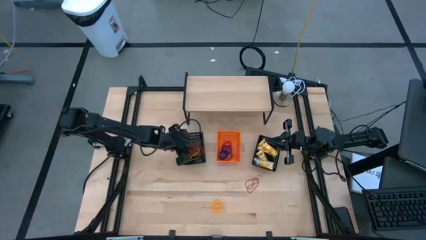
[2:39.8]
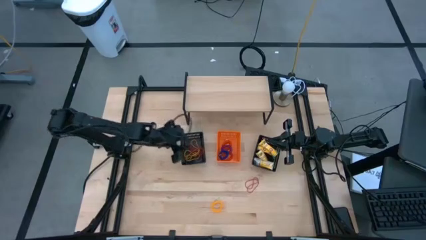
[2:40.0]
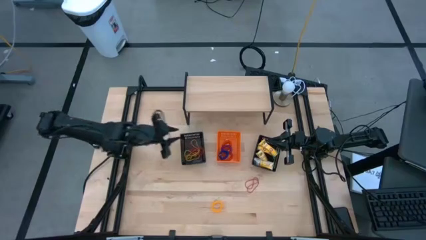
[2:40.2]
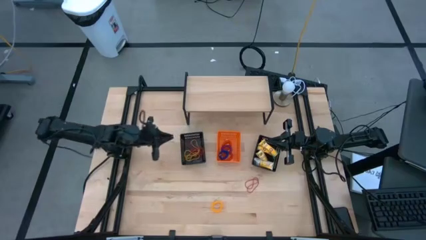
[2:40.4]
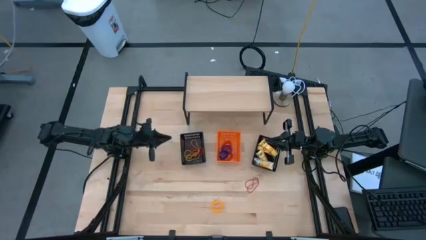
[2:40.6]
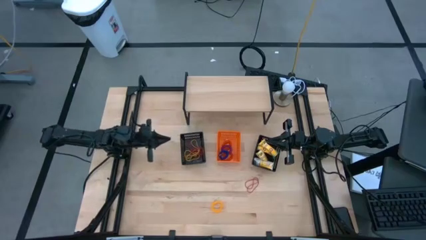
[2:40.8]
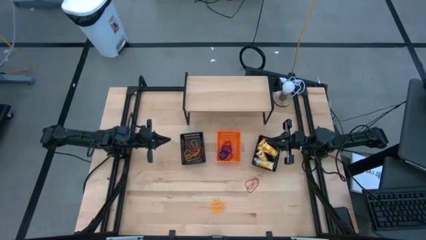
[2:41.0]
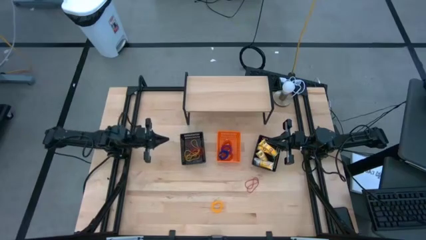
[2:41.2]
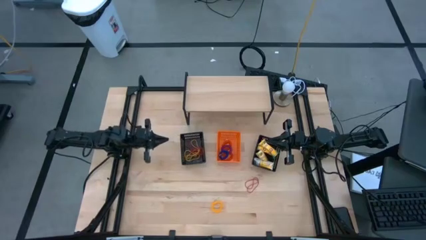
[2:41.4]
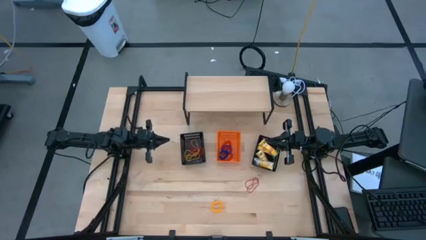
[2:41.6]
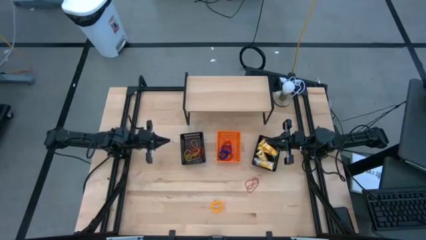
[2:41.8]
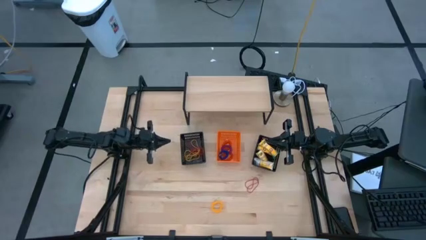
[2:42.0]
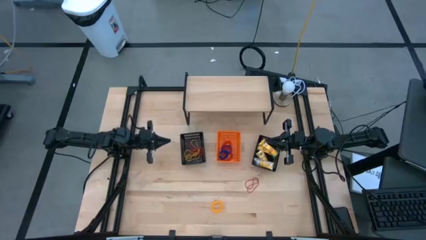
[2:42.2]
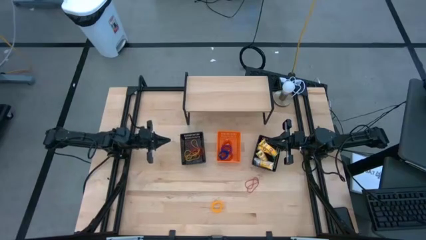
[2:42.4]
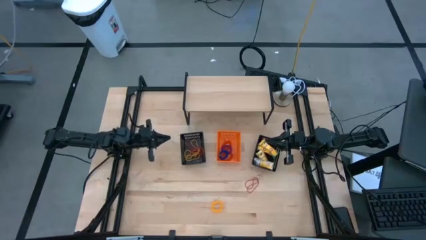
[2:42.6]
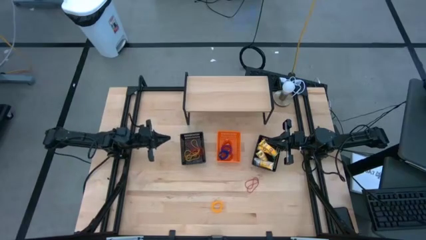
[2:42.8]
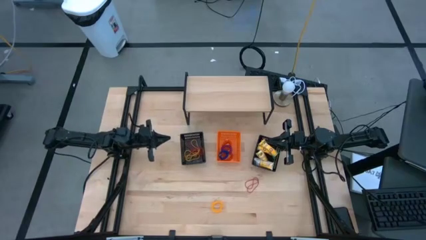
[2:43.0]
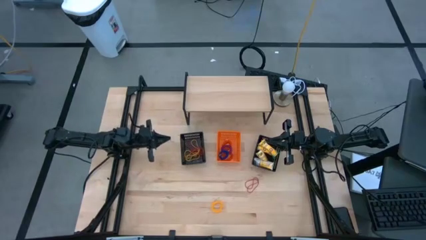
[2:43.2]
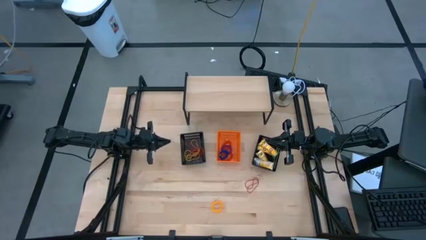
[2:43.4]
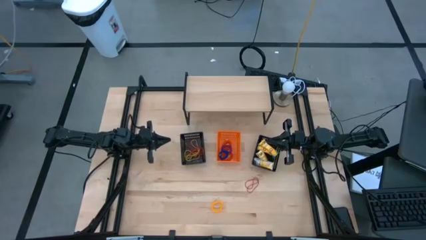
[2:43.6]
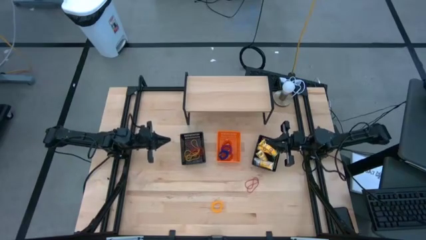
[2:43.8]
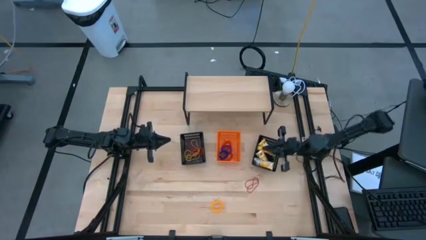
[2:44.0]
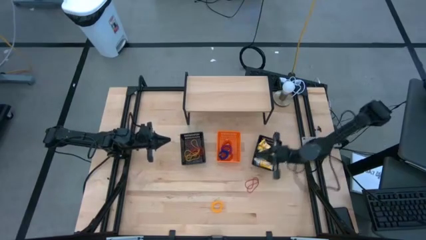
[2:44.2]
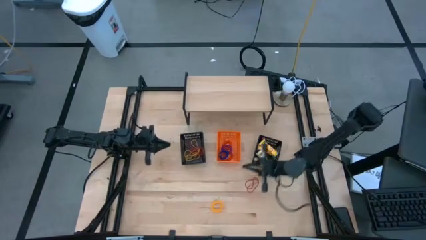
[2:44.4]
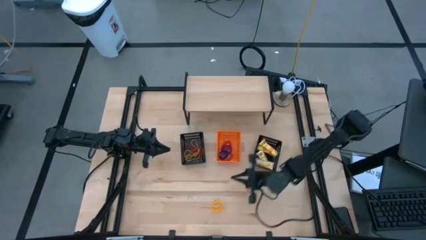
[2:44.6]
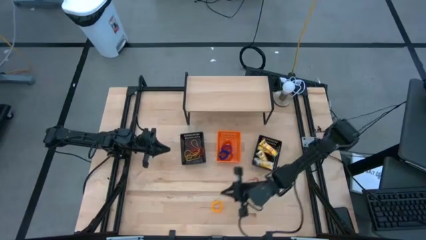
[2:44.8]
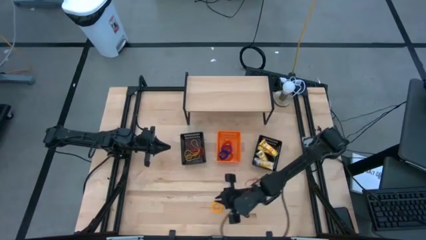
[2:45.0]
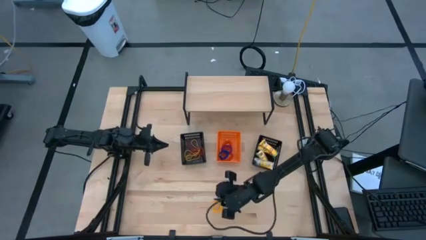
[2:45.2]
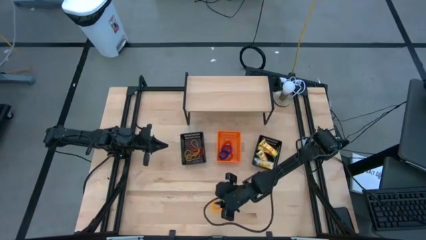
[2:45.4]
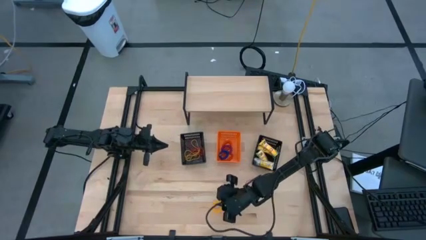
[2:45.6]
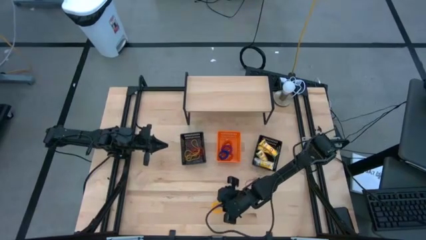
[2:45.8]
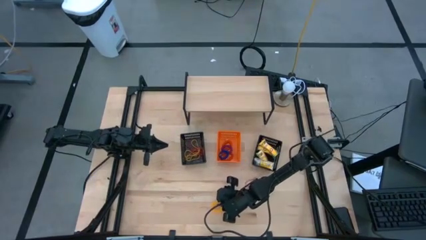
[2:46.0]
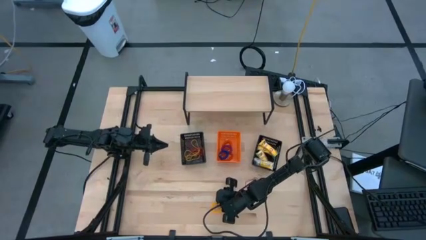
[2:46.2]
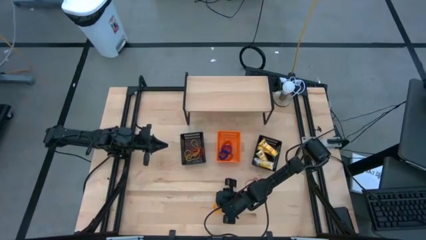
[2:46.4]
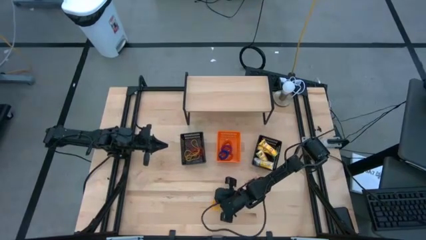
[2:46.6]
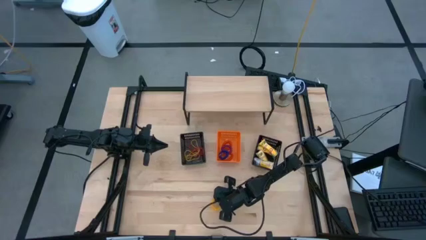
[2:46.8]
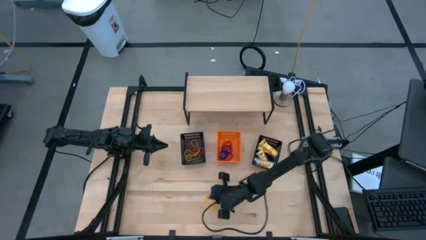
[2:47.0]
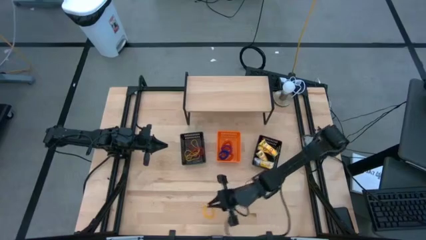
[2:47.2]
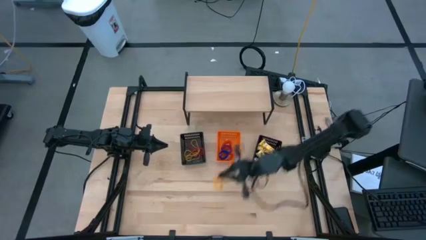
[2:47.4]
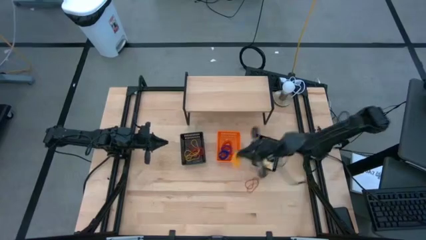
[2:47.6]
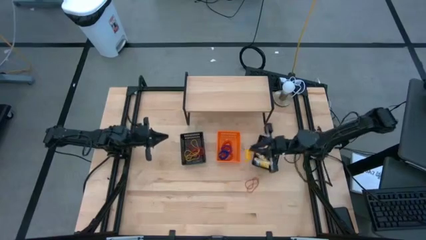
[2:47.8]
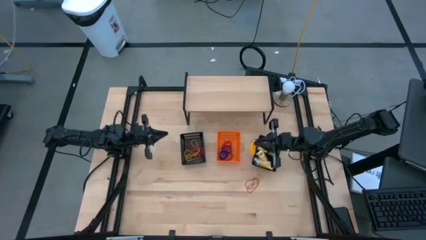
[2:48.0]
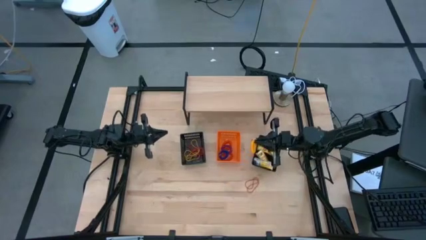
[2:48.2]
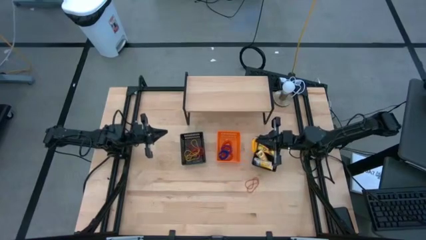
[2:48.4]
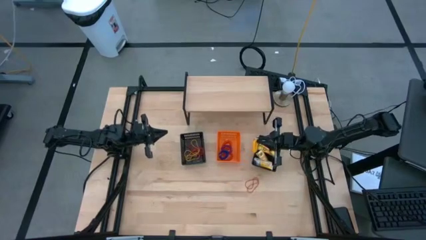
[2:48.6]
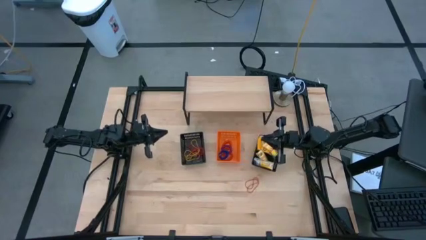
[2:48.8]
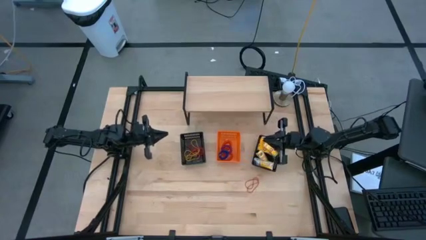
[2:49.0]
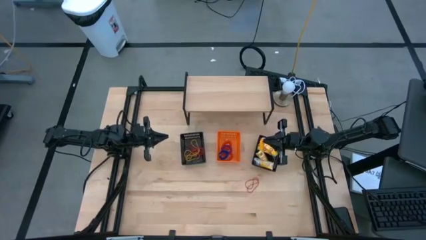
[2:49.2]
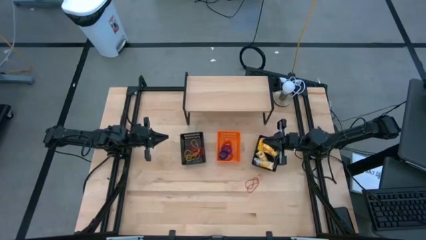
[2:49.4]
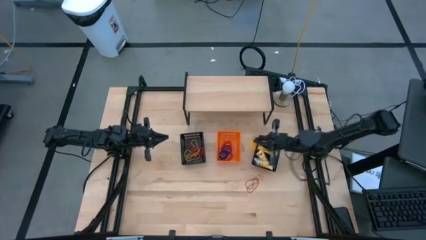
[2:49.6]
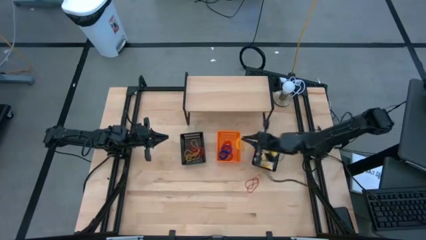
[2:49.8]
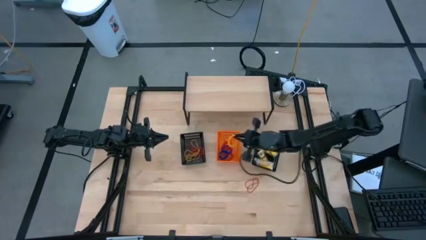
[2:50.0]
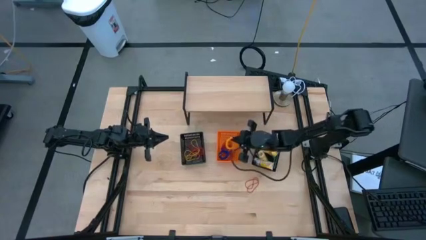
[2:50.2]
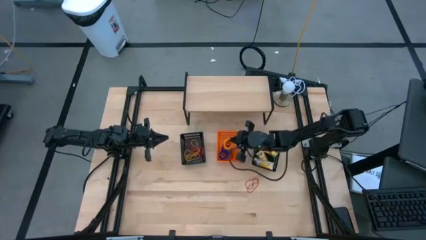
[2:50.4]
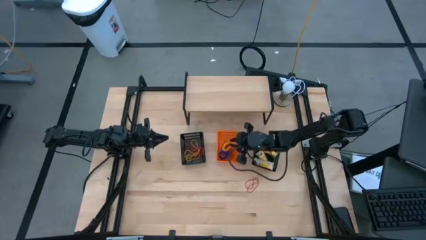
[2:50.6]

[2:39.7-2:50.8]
Task: Pick & Place Office Desk Supplies
Put the yellow spring rubber band into the orange bin
